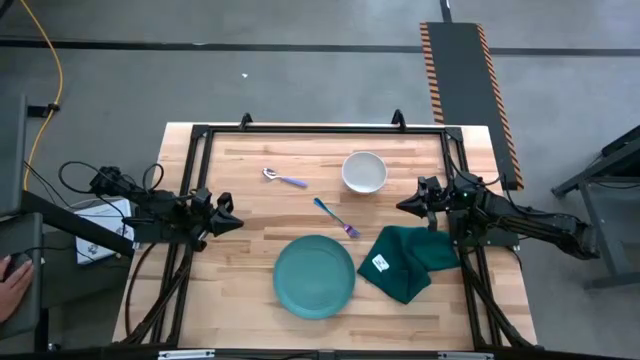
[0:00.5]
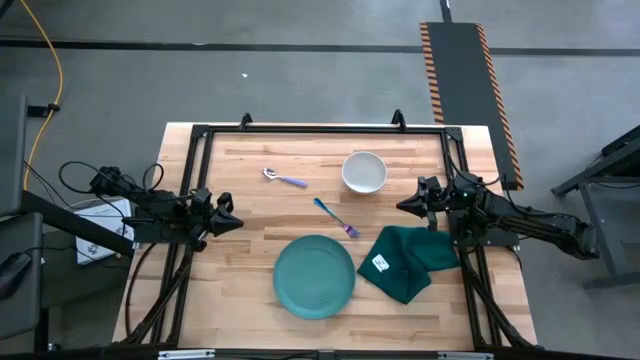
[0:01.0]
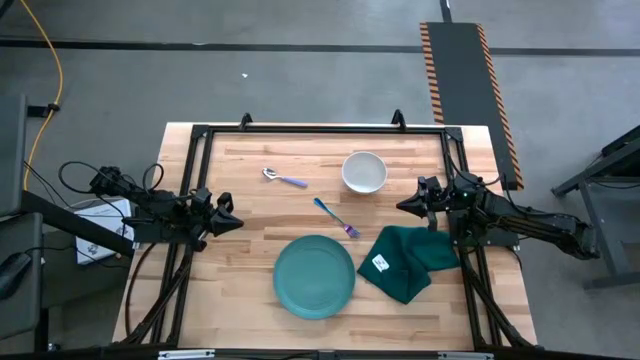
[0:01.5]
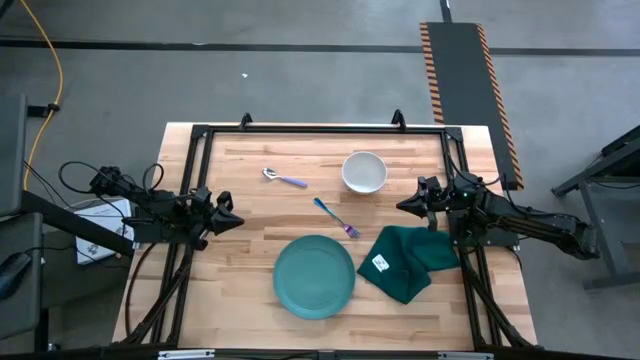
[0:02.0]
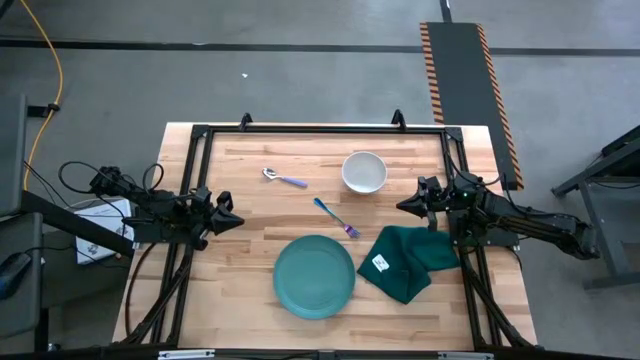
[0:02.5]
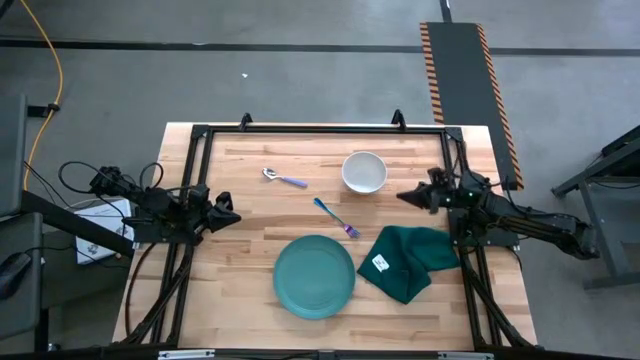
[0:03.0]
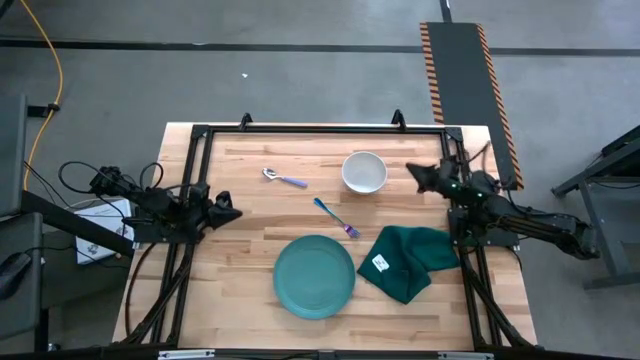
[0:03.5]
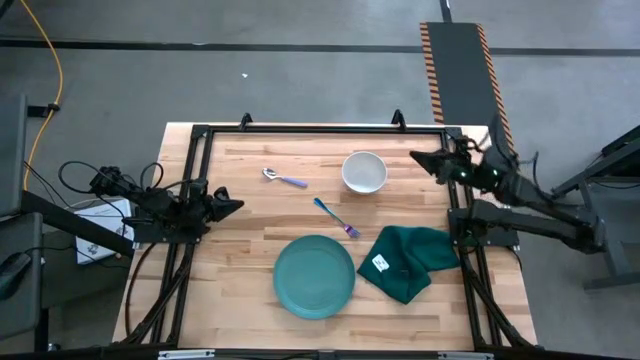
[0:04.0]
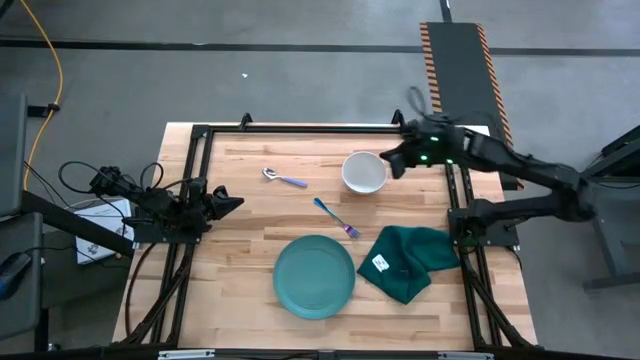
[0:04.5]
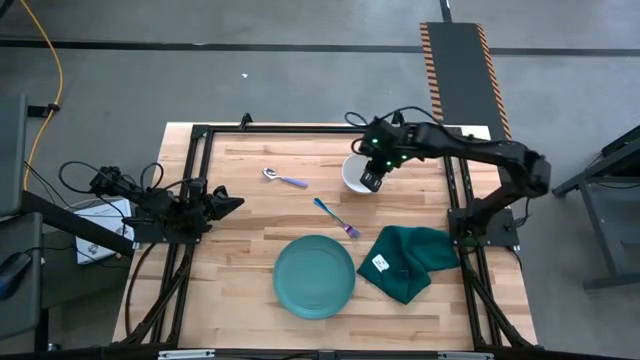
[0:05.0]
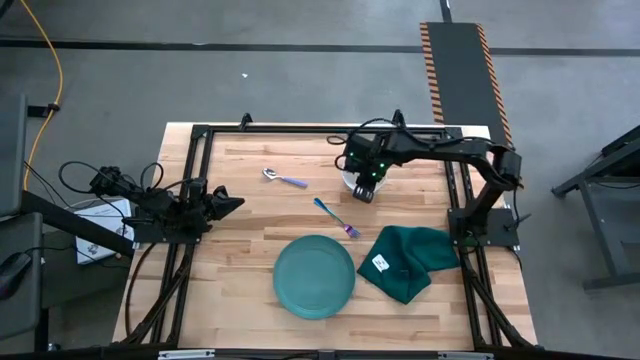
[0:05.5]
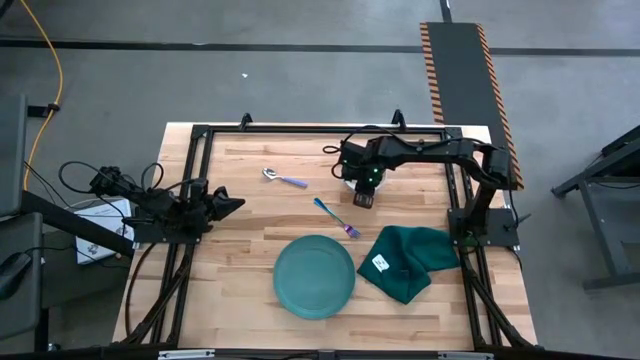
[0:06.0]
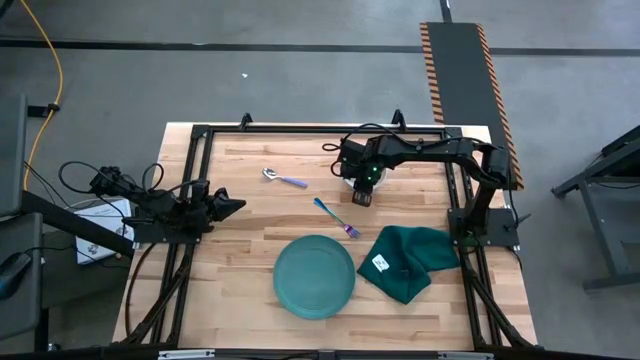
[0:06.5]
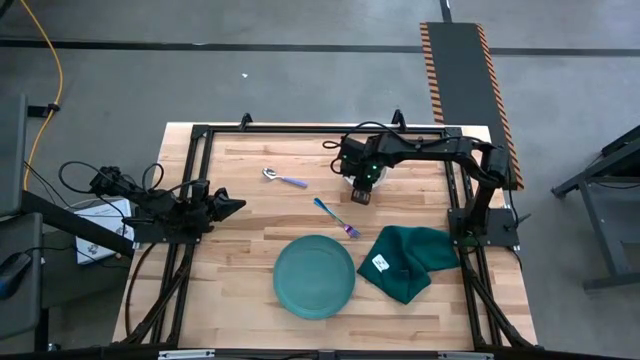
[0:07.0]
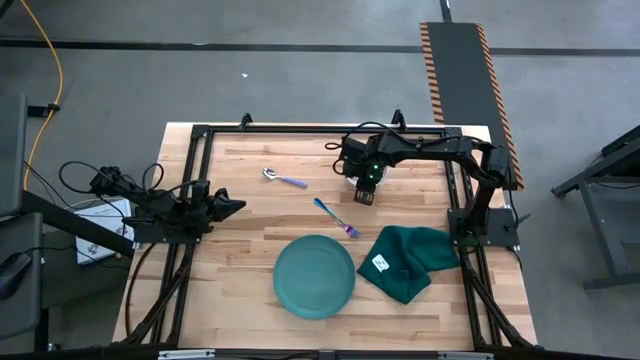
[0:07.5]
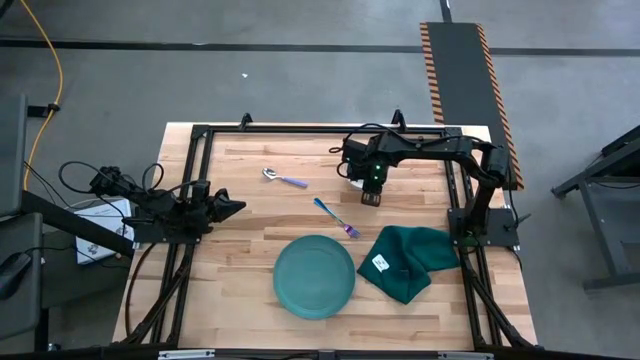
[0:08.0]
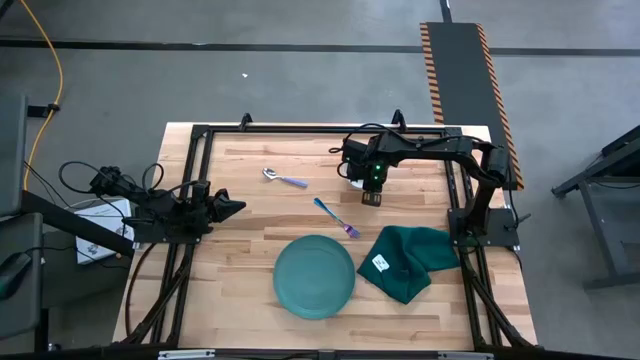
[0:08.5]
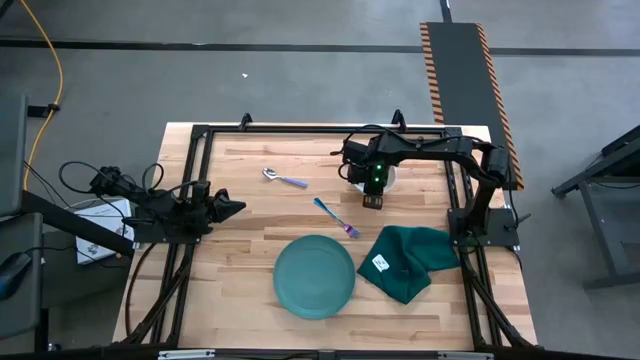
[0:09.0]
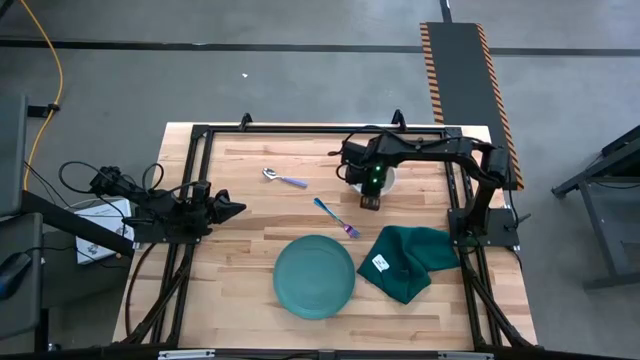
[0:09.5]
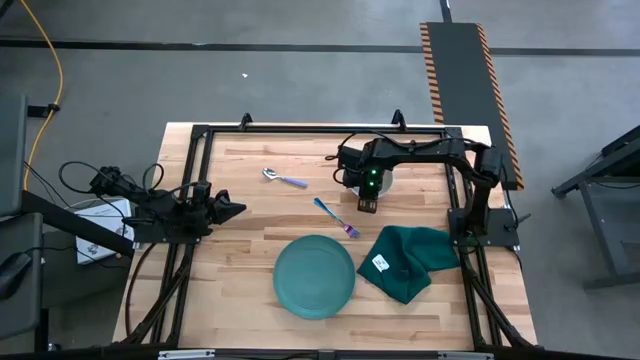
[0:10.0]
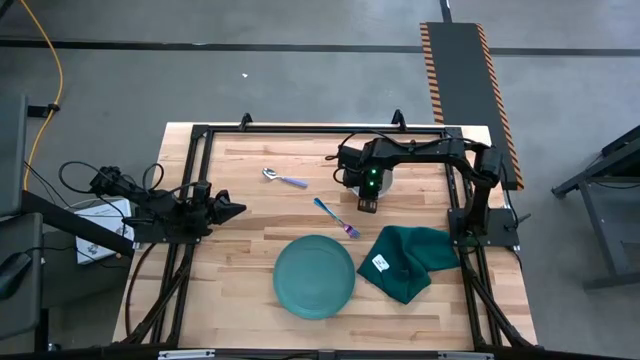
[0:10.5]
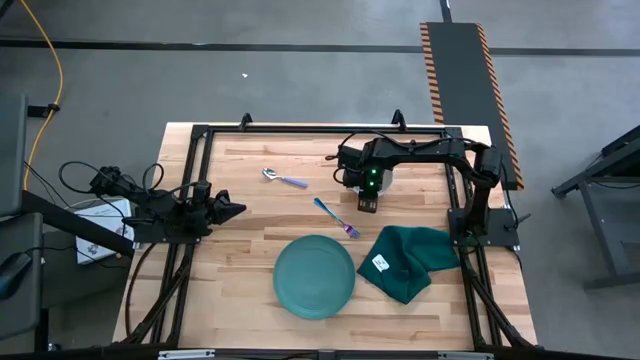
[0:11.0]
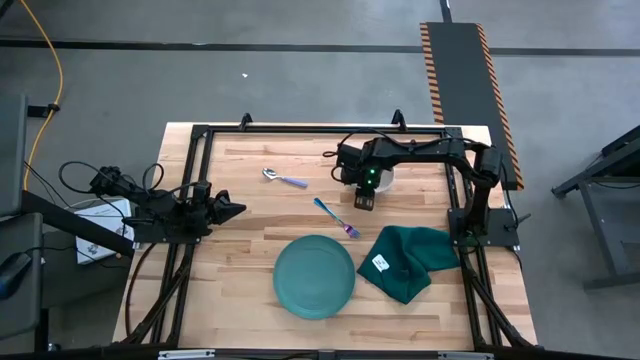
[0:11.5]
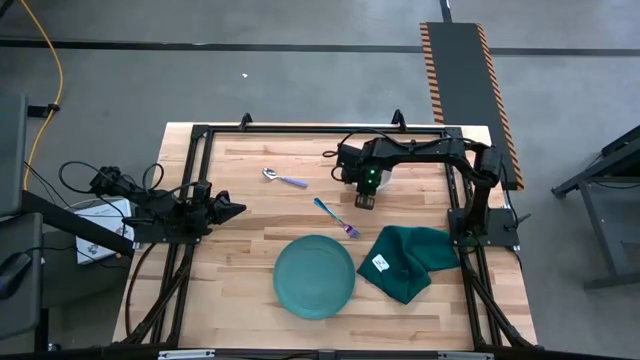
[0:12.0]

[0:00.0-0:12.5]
Task: Set table place
Stack the white bowl on the green plate

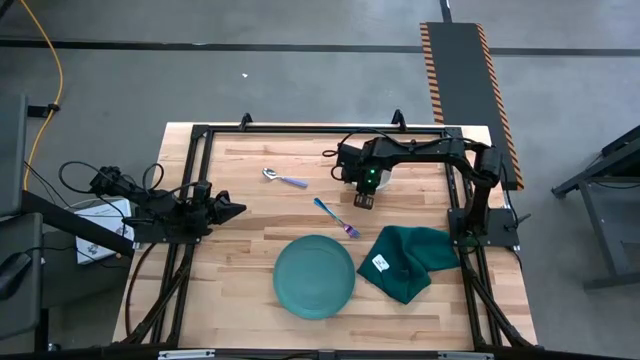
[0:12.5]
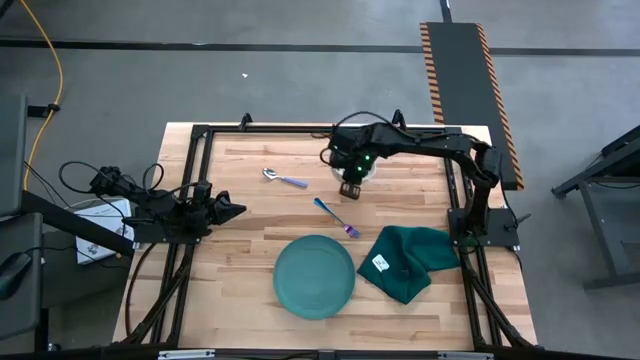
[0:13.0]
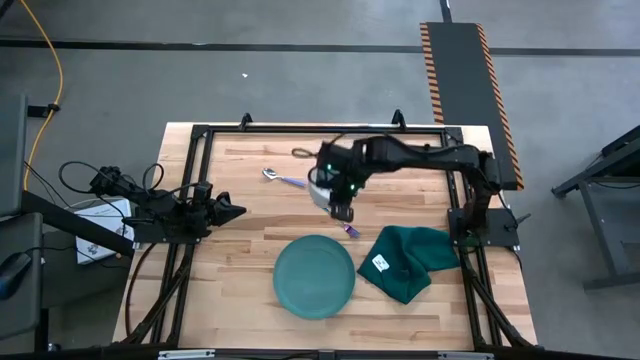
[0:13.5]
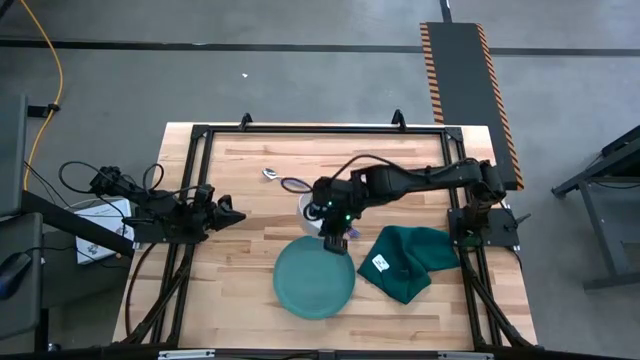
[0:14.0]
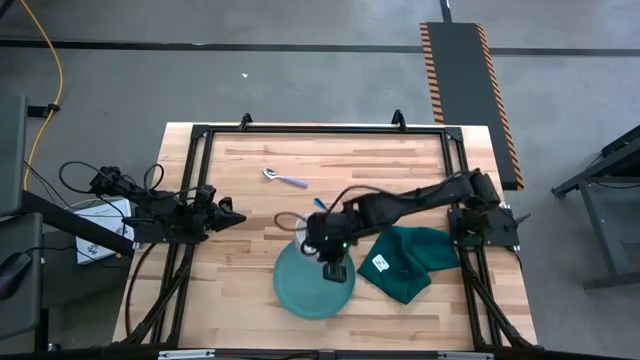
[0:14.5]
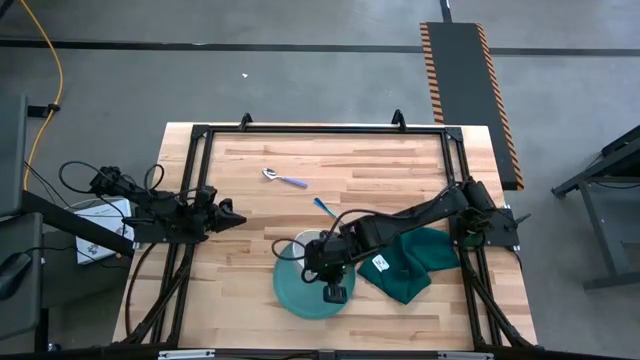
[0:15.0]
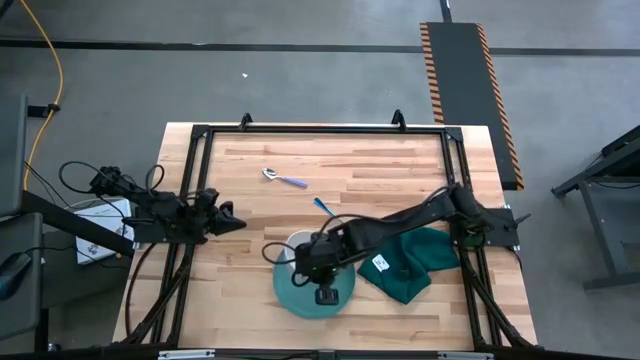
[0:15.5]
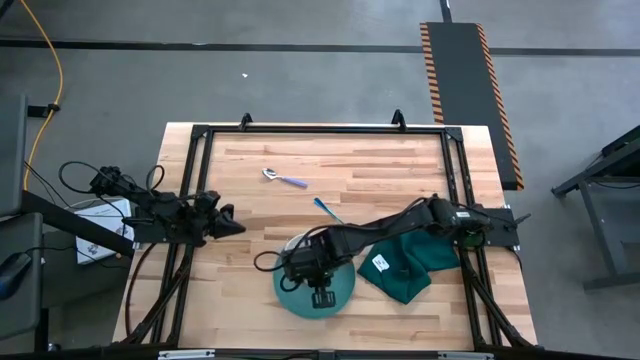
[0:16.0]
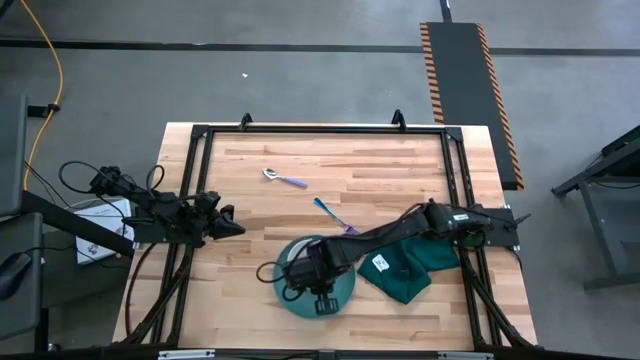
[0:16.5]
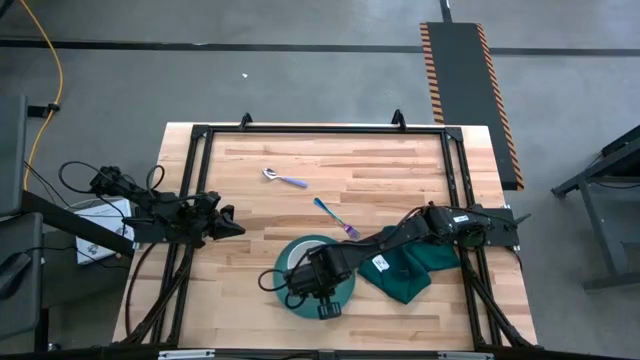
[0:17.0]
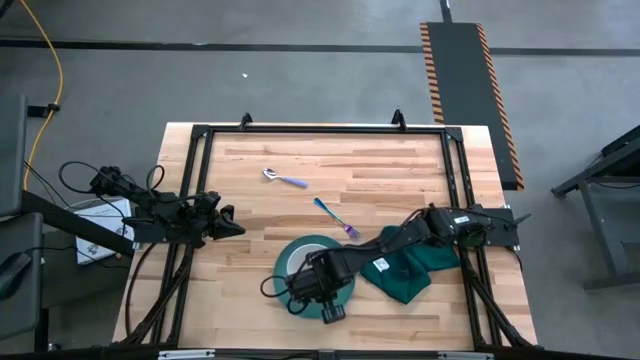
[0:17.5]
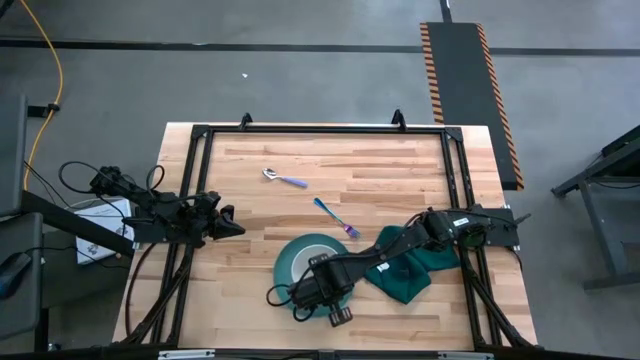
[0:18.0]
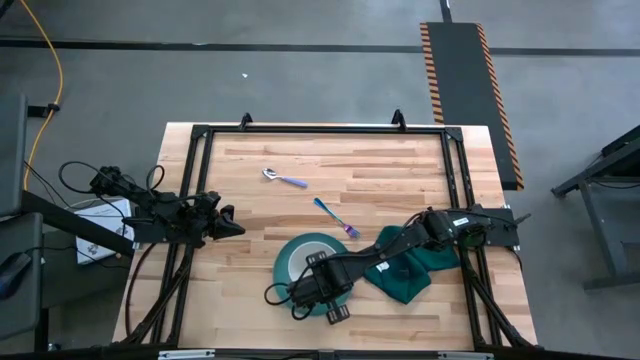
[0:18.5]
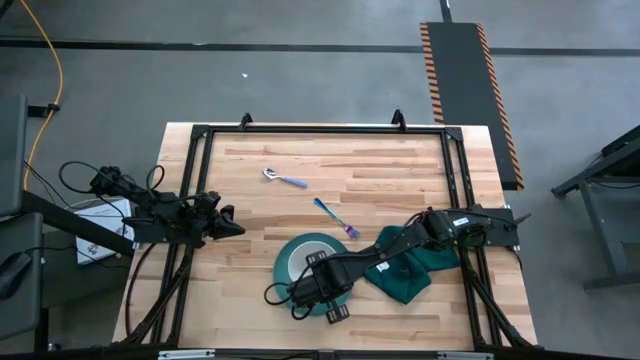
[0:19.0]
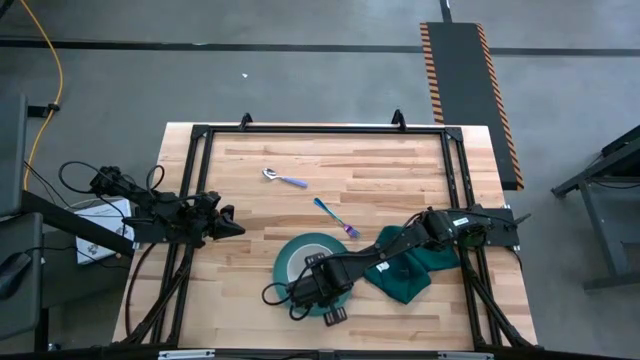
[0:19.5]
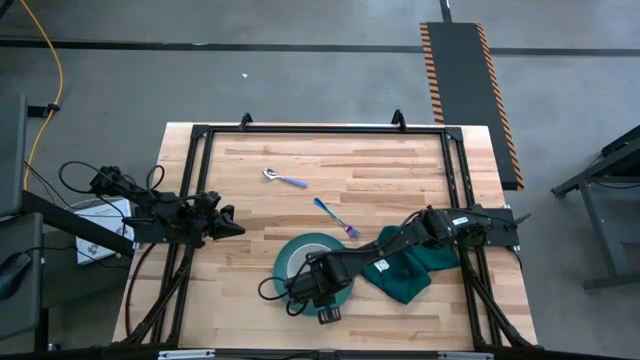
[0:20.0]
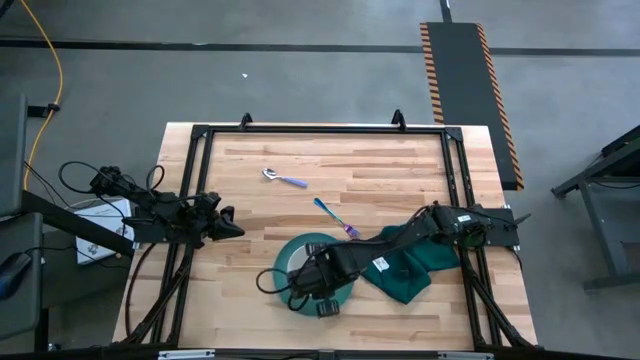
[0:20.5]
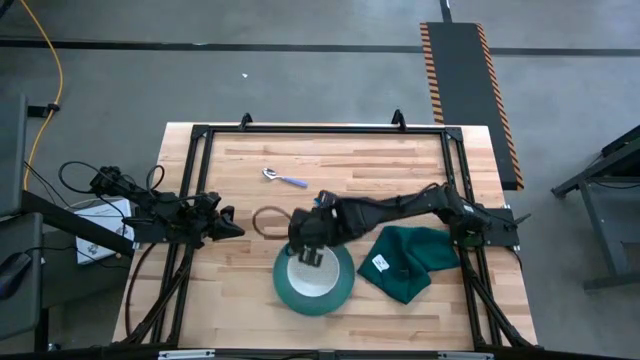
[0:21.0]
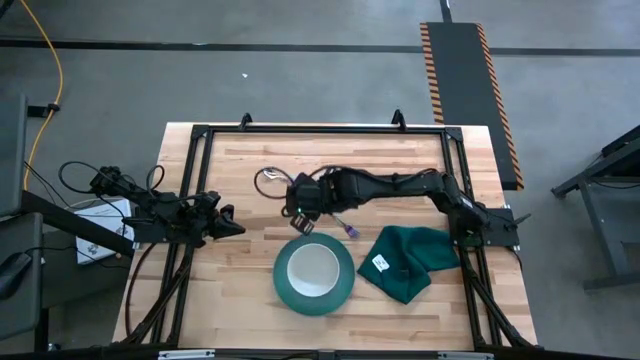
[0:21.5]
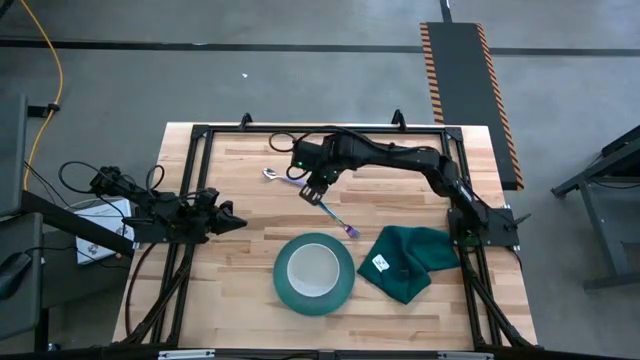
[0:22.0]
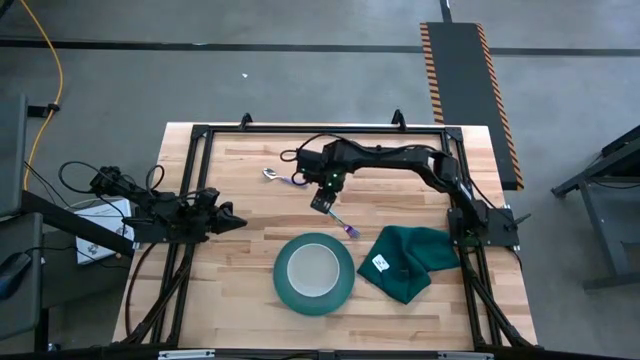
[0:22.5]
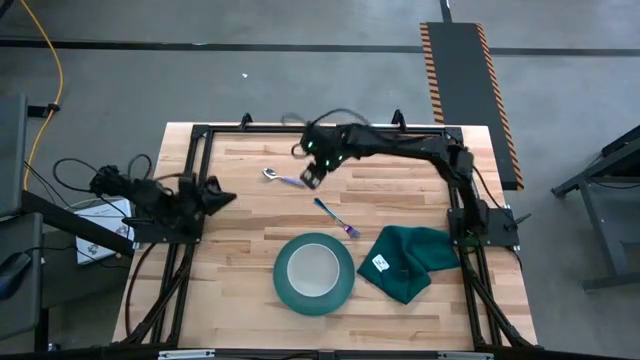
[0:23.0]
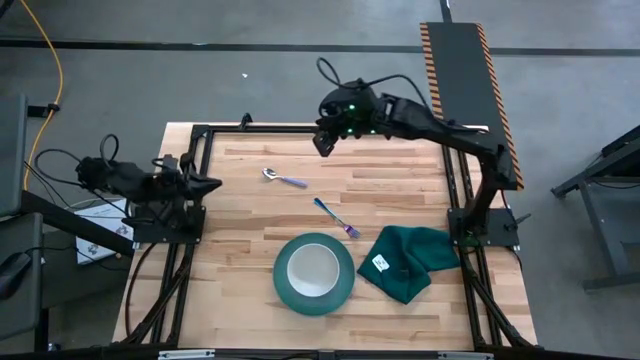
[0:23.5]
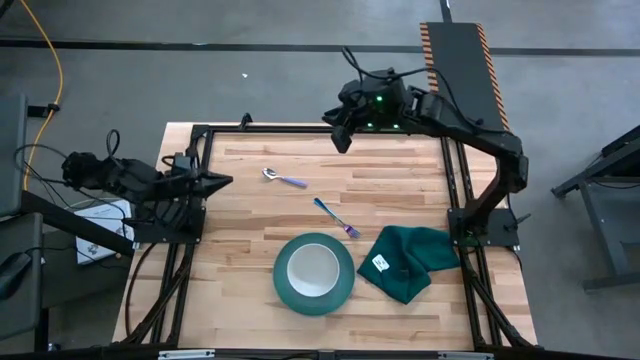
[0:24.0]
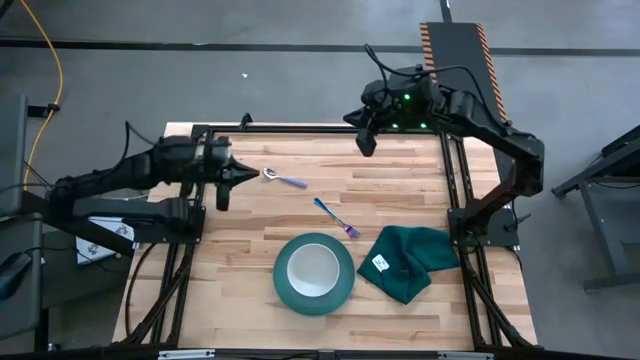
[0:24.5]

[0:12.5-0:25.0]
Stack the white bowl on the green plate
